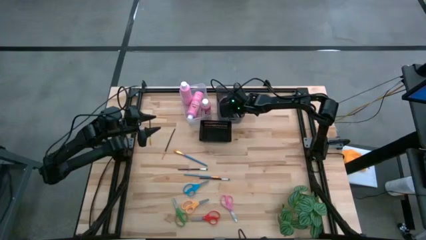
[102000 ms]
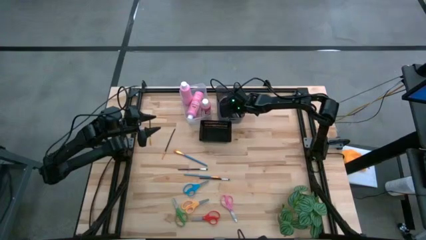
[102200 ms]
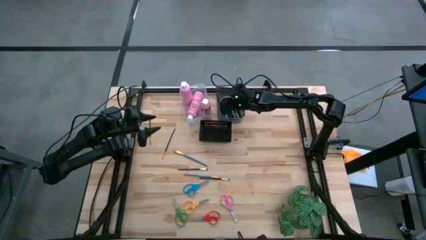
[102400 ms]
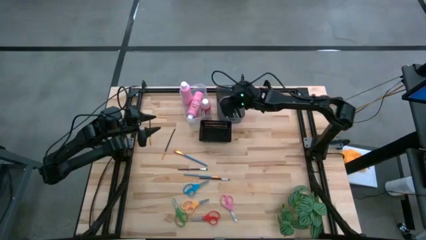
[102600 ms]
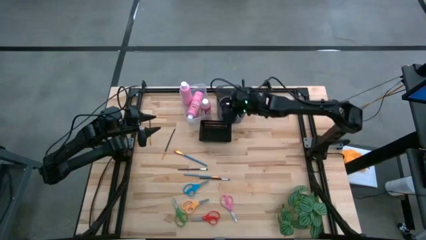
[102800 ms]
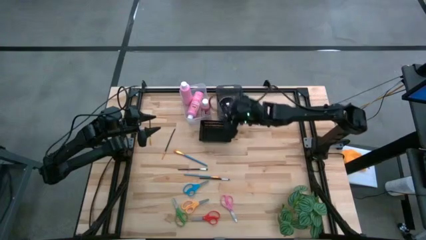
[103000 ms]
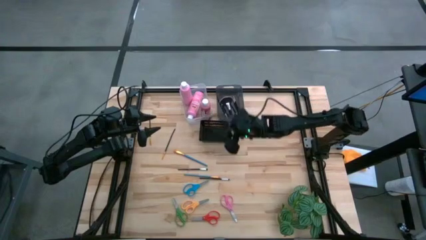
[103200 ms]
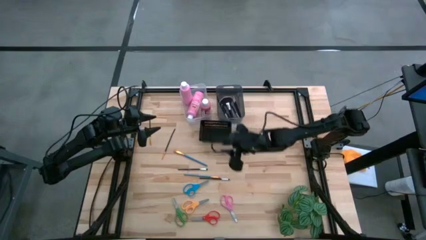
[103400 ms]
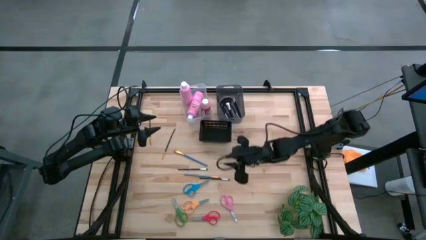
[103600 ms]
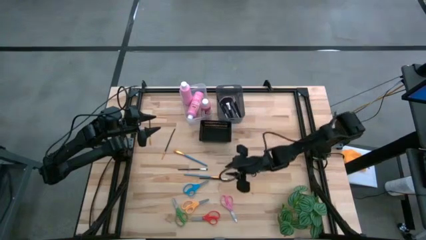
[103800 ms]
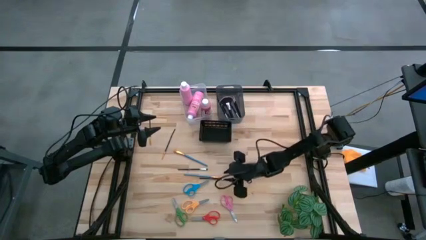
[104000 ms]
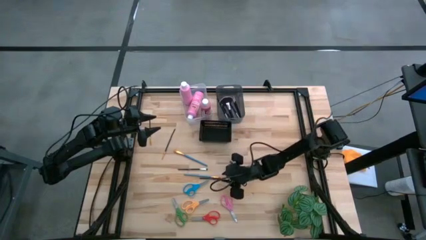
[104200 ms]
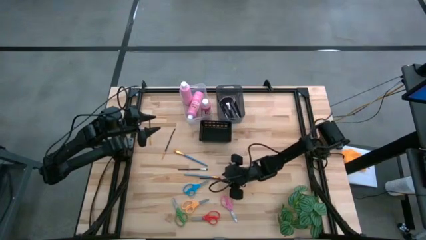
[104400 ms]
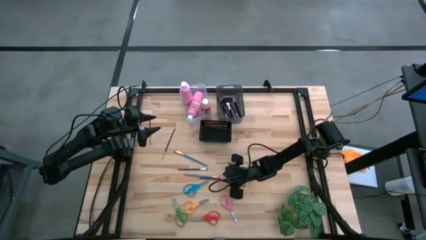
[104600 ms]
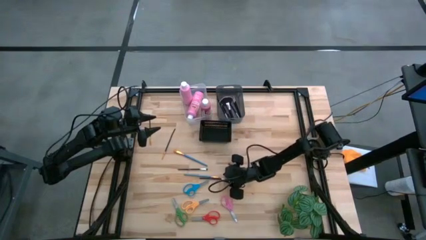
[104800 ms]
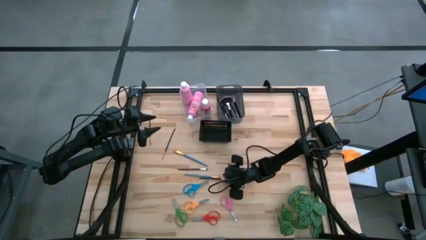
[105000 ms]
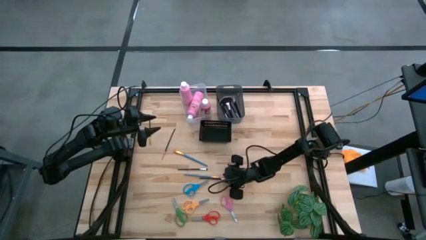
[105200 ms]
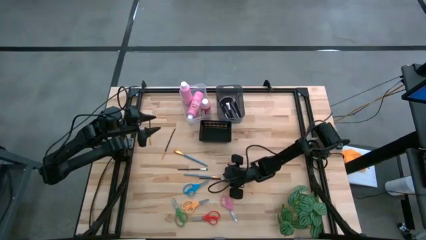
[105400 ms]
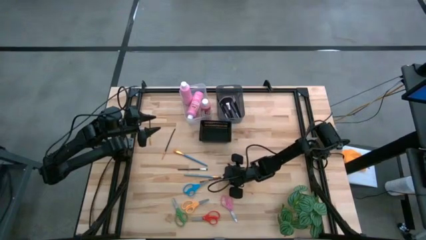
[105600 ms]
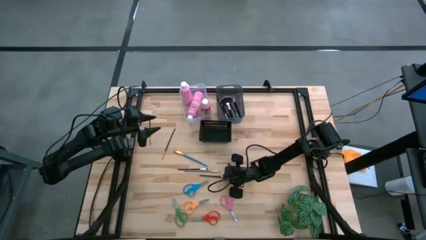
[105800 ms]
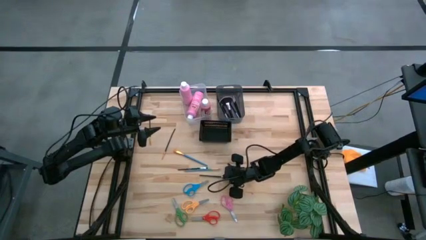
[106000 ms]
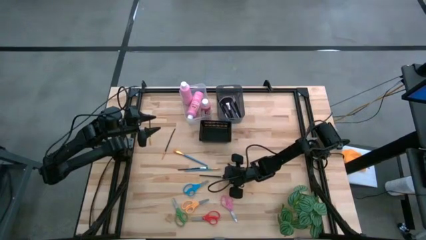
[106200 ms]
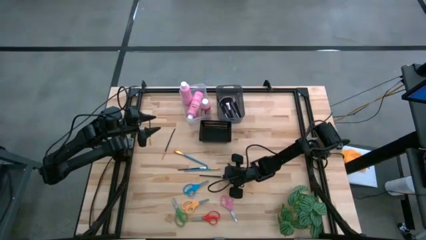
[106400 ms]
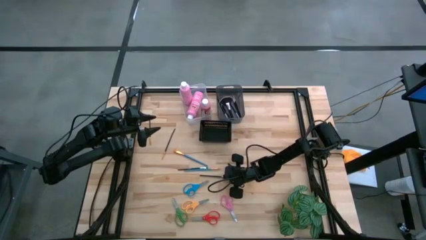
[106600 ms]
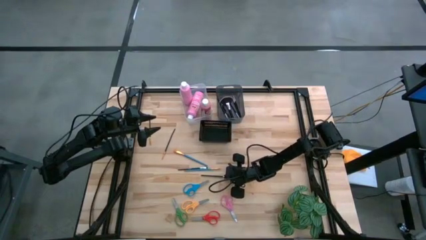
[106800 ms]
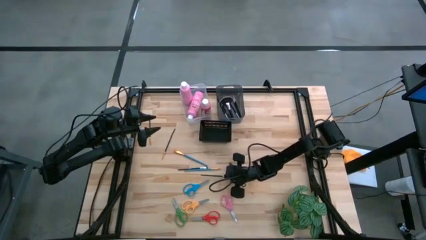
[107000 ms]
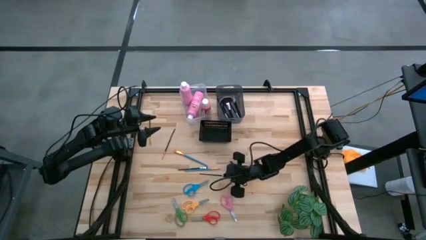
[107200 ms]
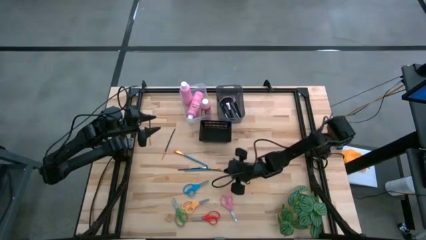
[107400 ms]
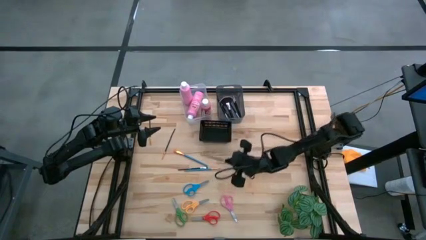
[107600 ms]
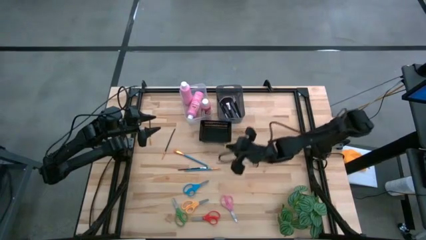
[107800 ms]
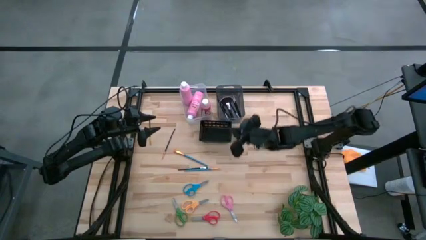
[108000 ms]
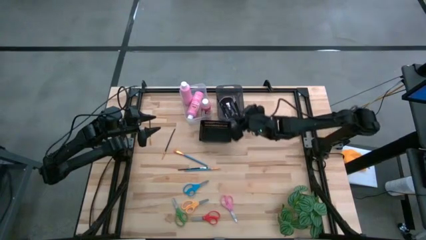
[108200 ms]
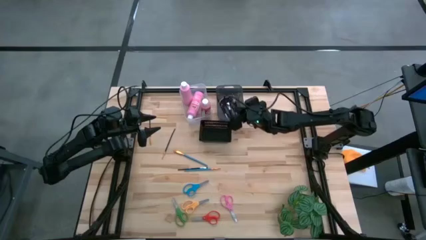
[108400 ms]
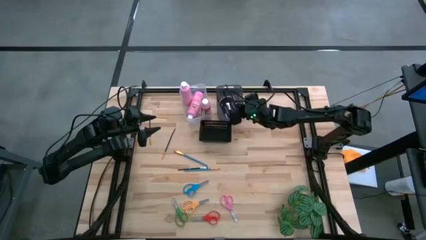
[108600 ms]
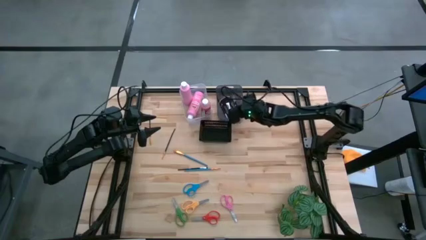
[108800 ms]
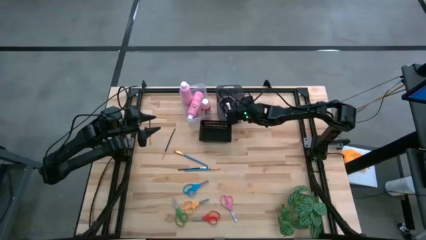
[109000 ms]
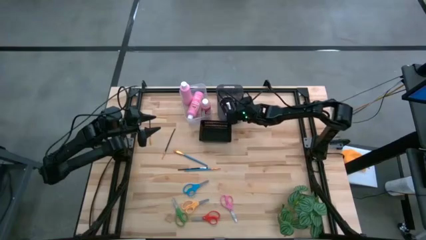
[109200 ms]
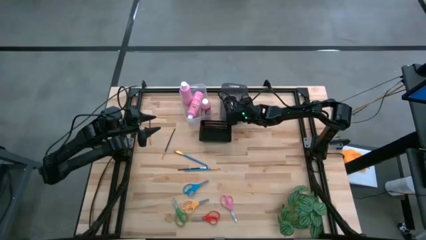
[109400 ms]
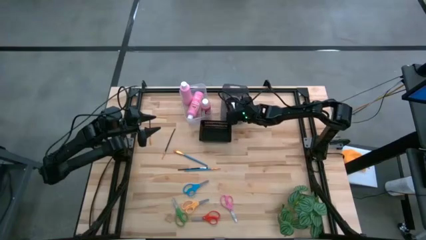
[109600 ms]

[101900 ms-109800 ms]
Task: Pick & Place Paint Supplies
Put the black paint brush into the gray bin

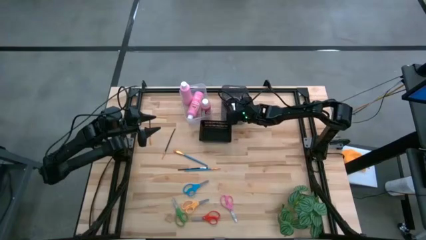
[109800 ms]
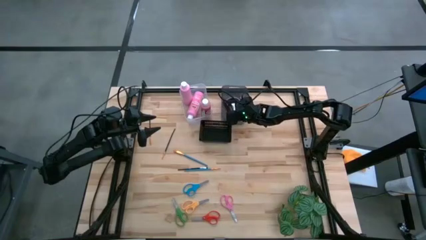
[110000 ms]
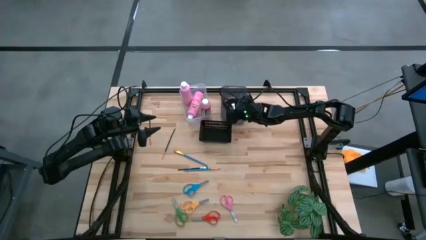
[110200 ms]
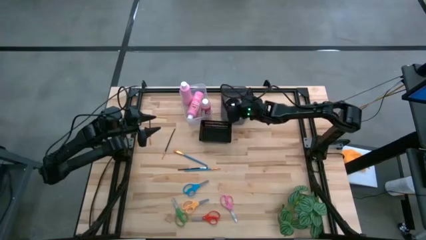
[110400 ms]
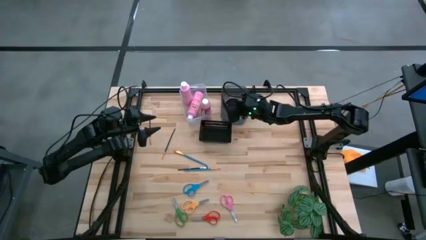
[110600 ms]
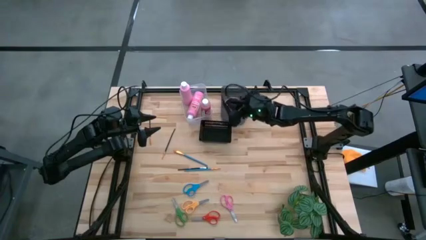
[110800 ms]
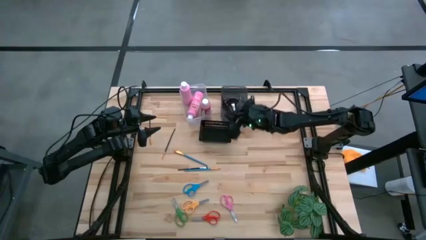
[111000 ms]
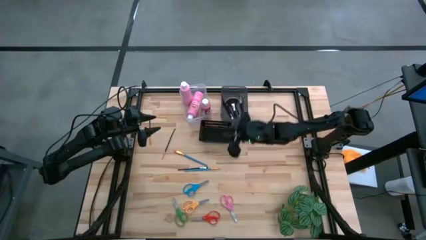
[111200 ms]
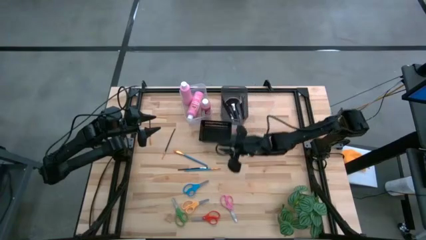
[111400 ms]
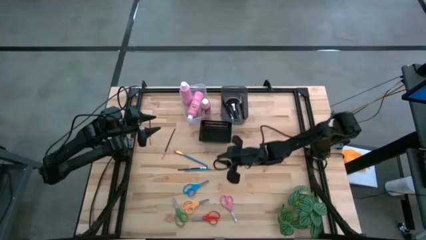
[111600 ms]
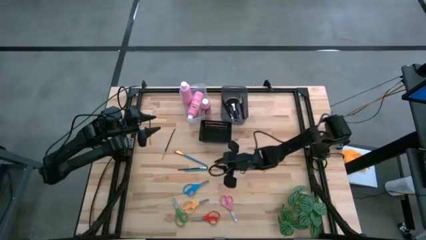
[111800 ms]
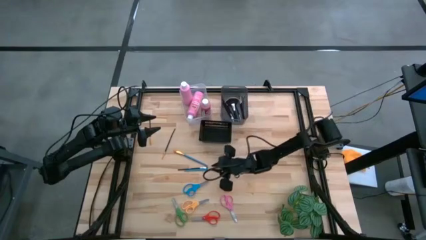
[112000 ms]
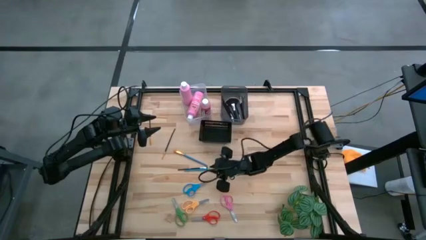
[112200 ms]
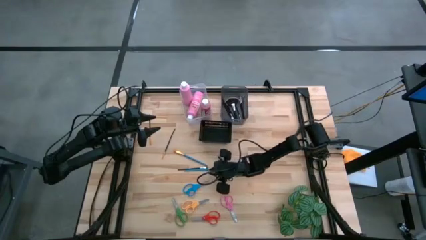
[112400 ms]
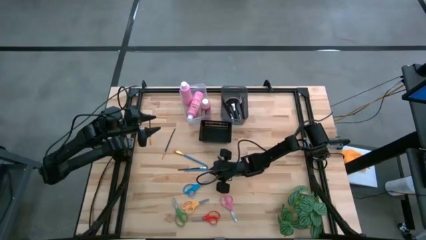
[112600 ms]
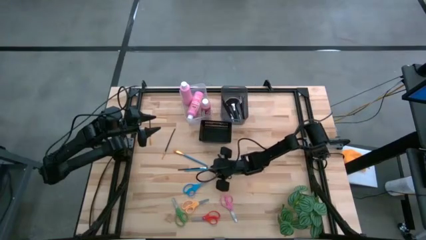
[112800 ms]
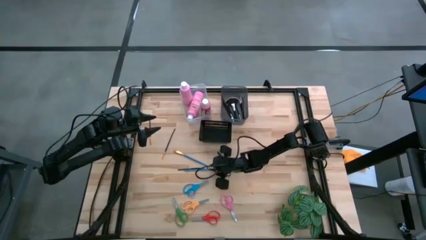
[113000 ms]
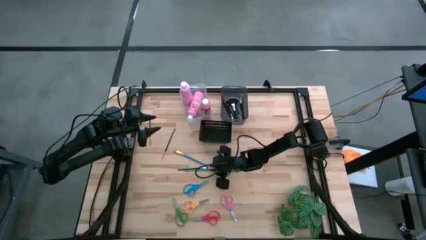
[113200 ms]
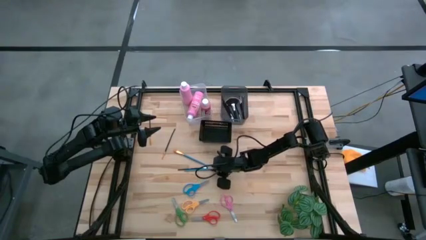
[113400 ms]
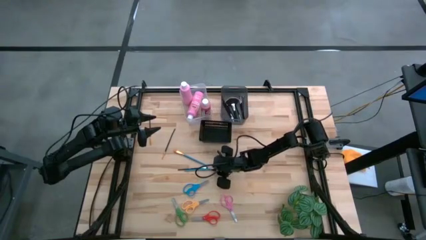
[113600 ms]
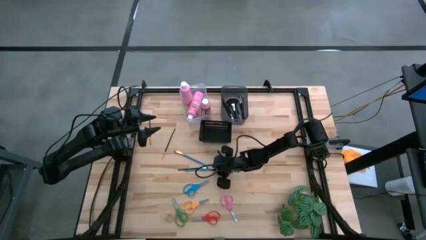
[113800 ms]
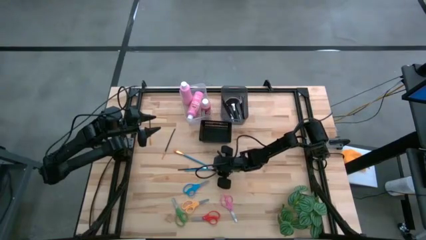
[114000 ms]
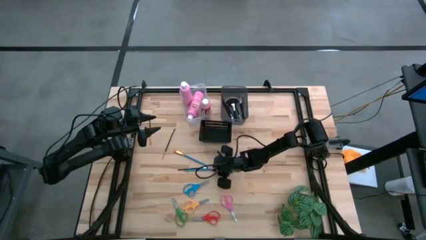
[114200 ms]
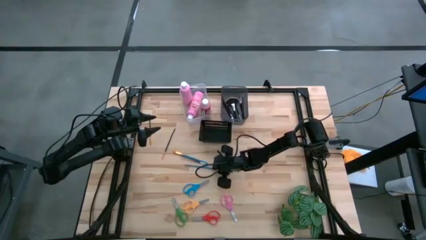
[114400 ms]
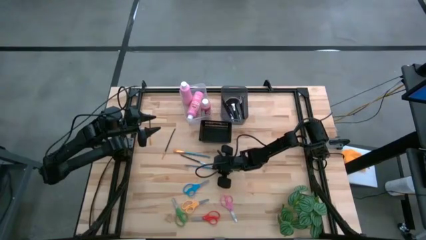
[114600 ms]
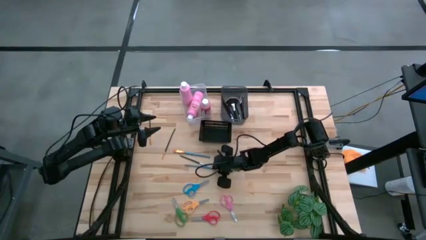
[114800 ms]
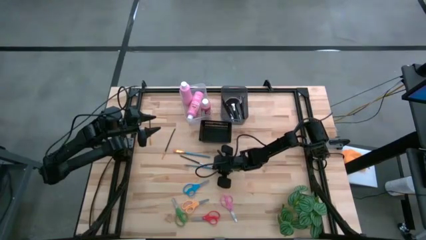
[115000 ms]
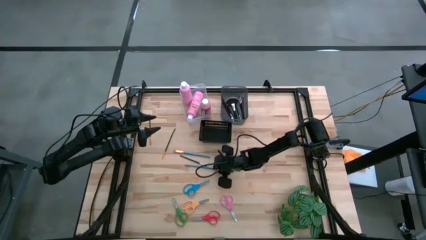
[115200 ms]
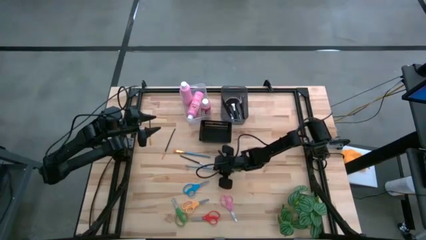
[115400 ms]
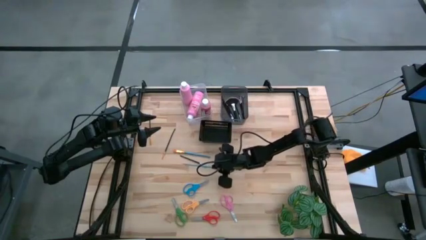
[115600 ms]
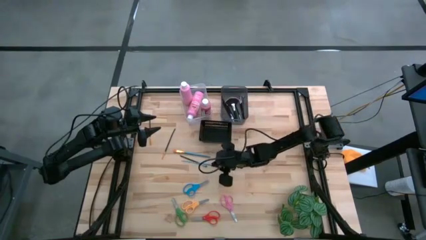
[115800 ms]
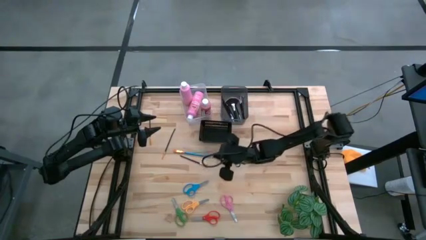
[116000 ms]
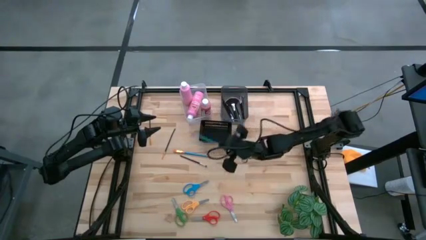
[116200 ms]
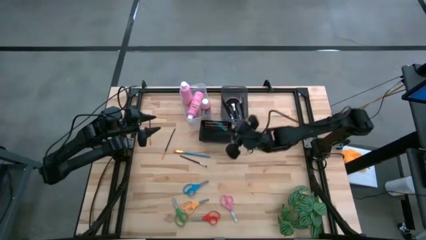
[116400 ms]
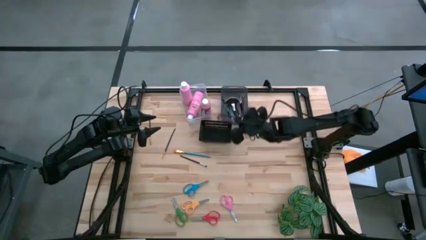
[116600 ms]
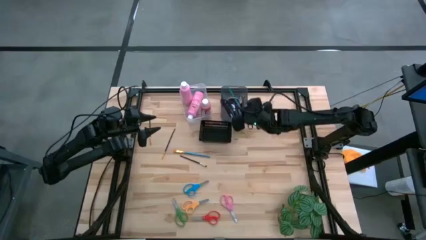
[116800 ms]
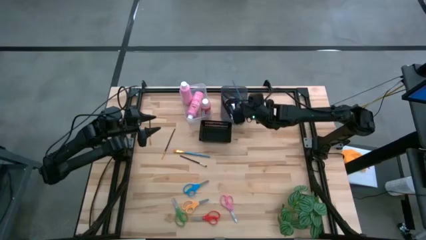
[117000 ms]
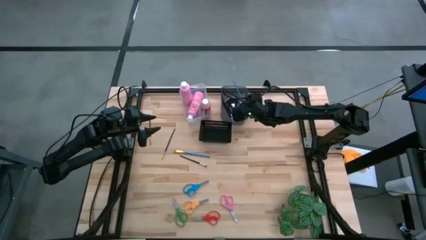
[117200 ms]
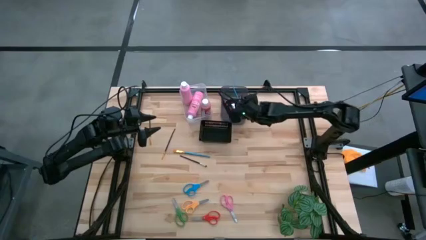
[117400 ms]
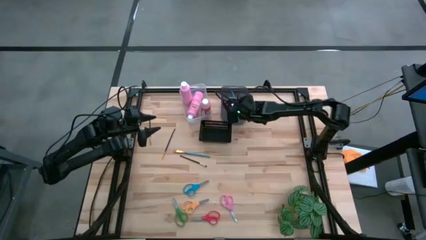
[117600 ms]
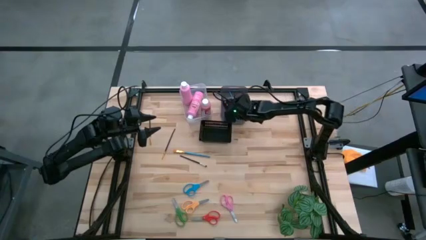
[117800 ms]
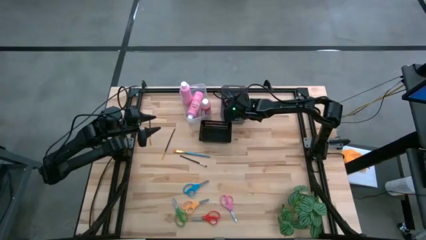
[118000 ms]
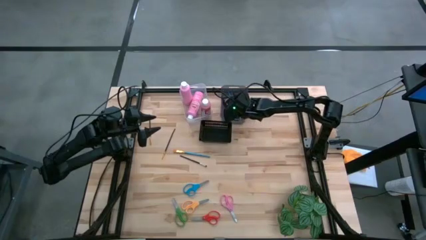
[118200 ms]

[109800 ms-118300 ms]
Put the blue paint brush into the gray bin

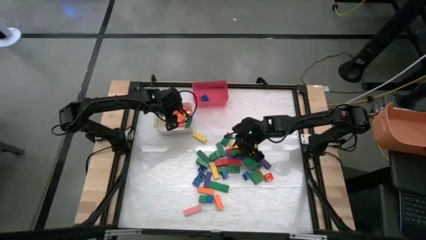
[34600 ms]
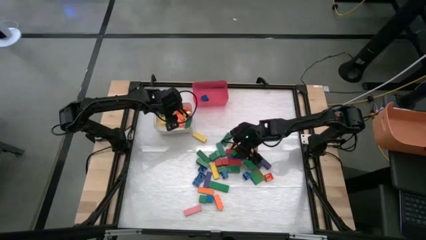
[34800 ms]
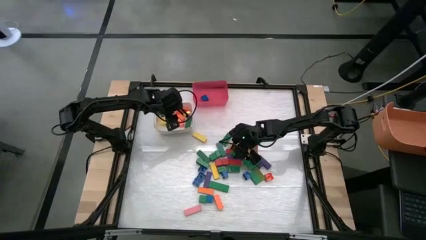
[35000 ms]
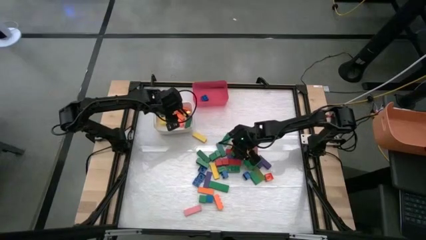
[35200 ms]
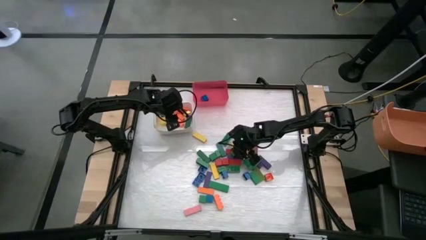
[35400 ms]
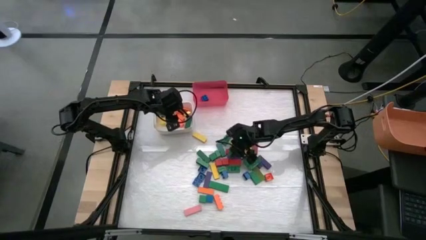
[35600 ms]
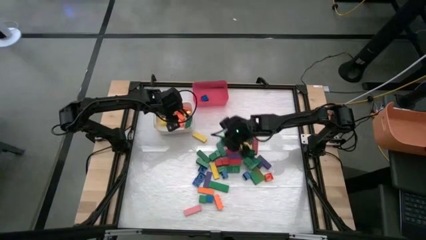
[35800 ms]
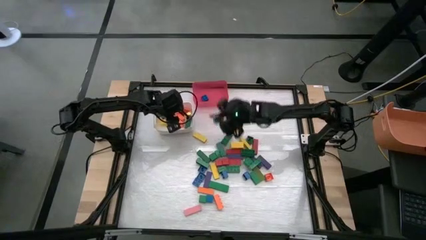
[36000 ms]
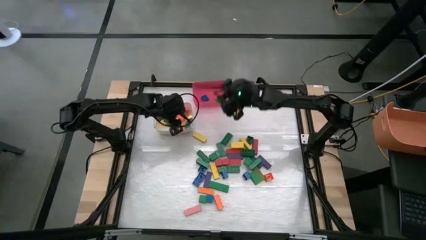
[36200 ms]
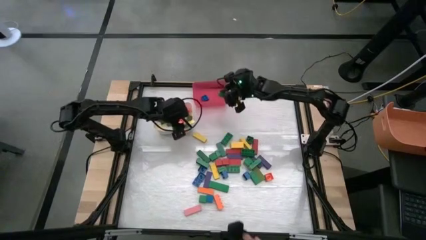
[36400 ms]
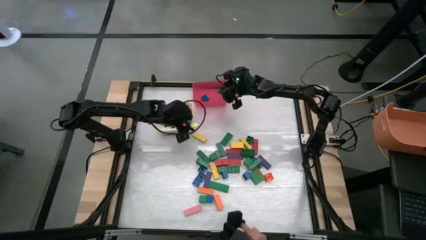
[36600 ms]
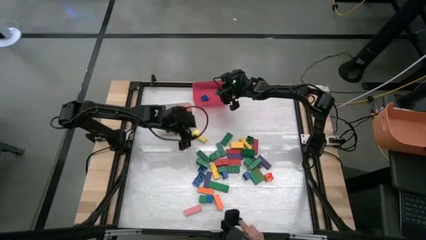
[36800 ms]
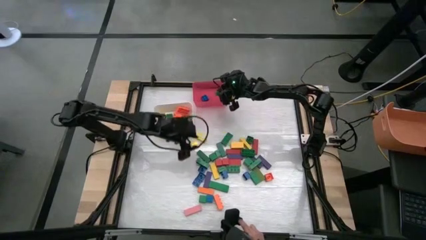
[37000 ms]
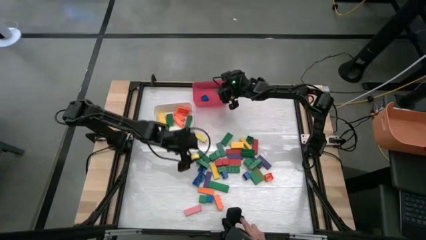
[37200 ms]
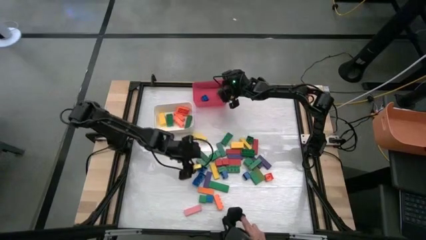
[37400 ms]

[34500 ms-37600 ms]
Task: Sort blocks by size
Put the small green game piece into the red bin
